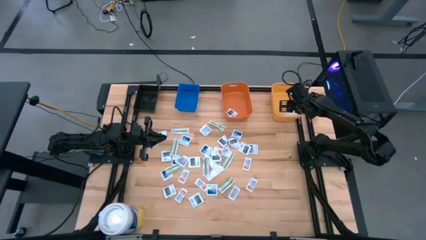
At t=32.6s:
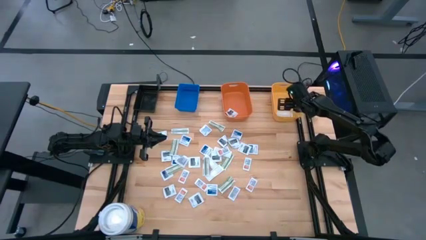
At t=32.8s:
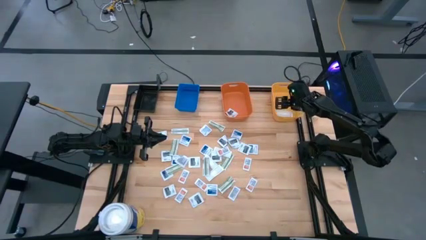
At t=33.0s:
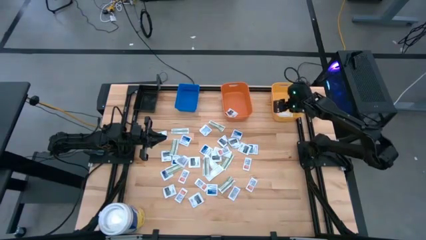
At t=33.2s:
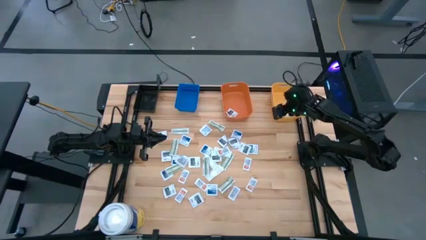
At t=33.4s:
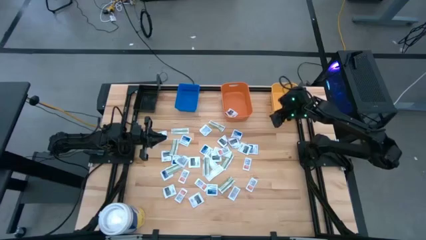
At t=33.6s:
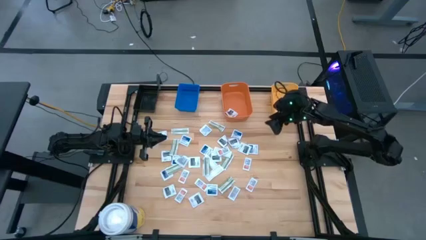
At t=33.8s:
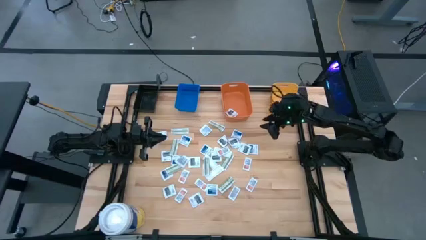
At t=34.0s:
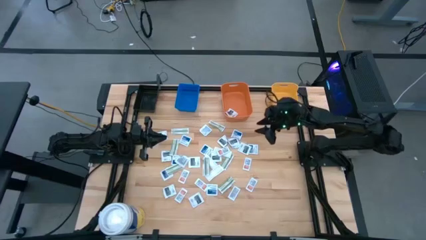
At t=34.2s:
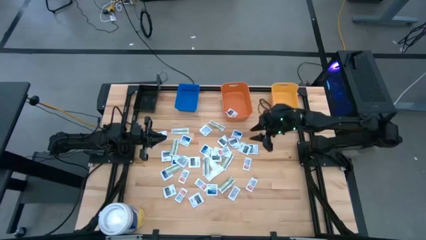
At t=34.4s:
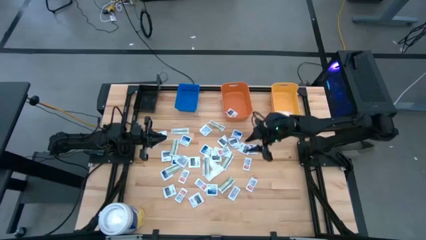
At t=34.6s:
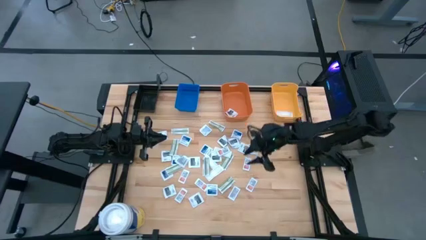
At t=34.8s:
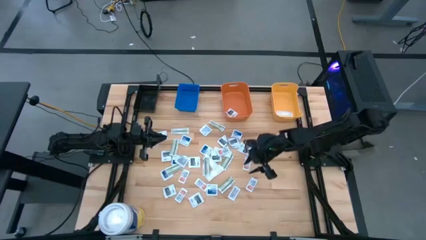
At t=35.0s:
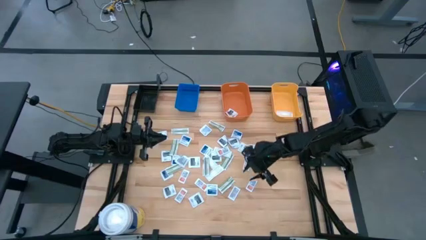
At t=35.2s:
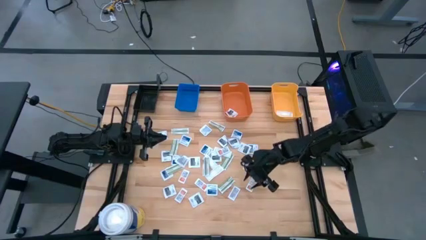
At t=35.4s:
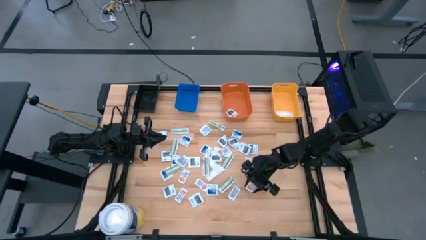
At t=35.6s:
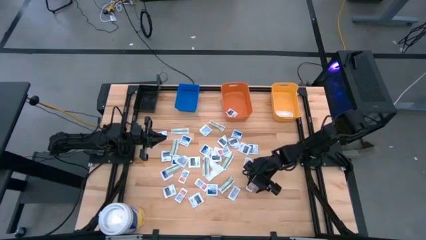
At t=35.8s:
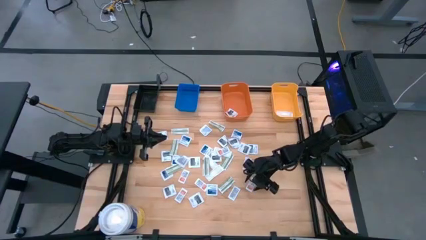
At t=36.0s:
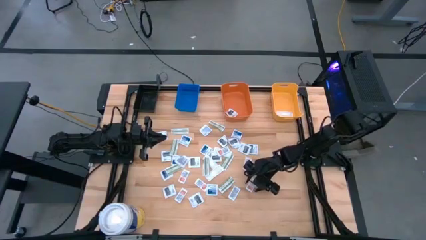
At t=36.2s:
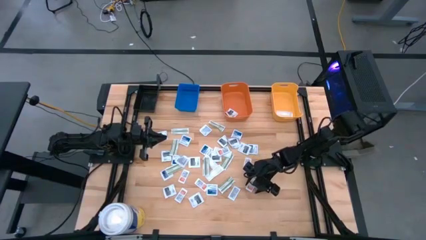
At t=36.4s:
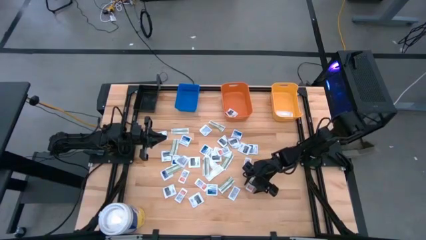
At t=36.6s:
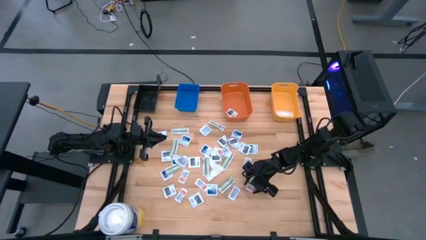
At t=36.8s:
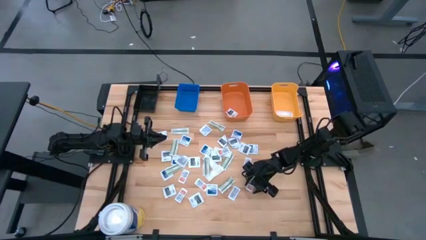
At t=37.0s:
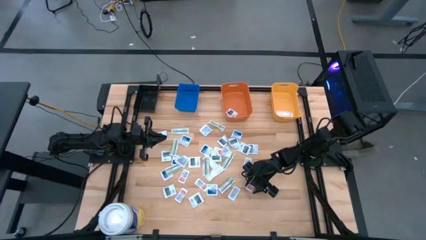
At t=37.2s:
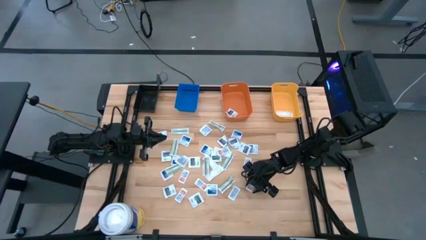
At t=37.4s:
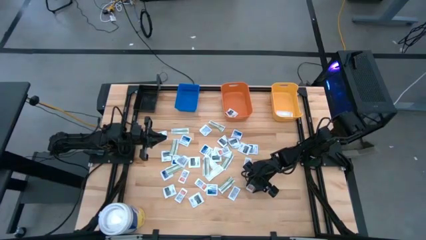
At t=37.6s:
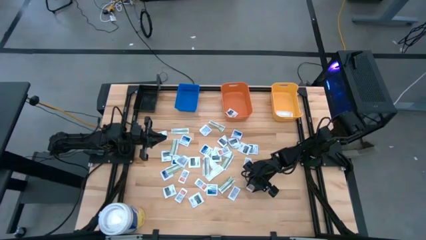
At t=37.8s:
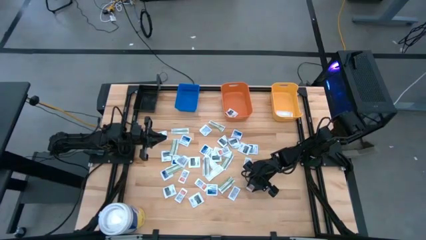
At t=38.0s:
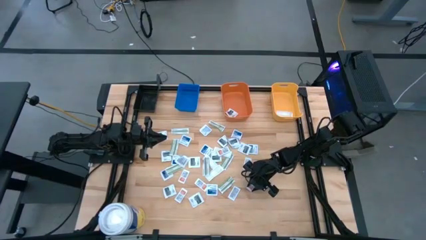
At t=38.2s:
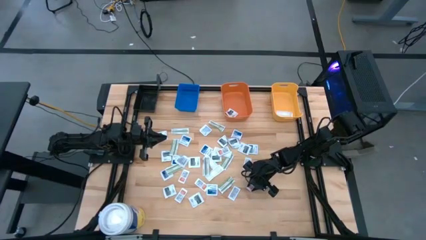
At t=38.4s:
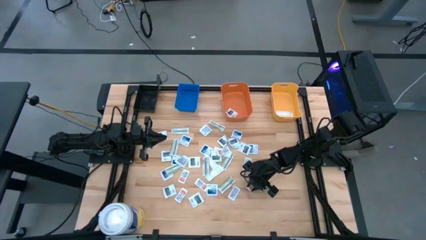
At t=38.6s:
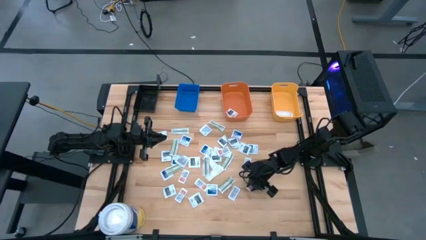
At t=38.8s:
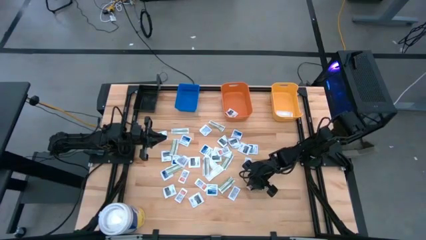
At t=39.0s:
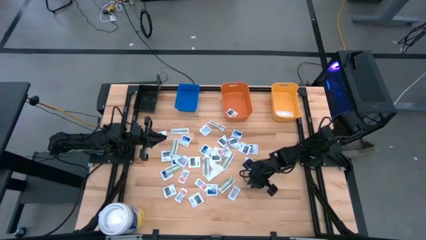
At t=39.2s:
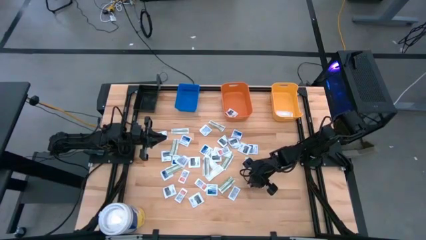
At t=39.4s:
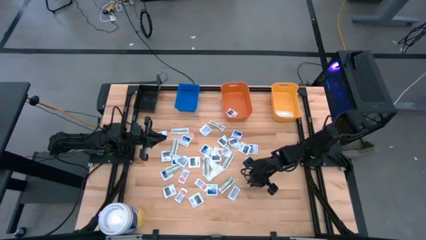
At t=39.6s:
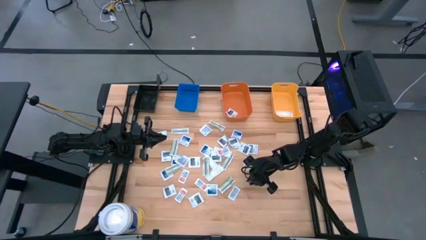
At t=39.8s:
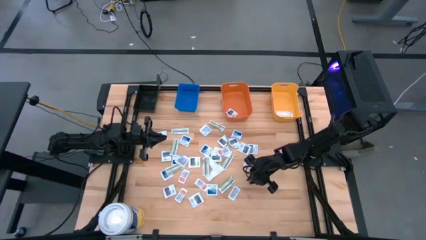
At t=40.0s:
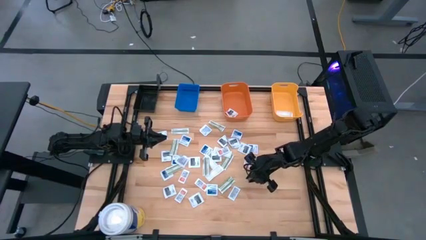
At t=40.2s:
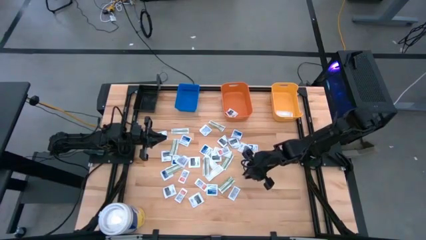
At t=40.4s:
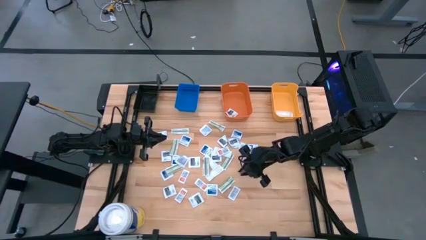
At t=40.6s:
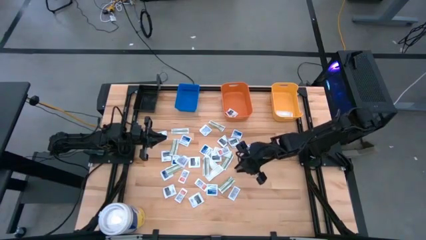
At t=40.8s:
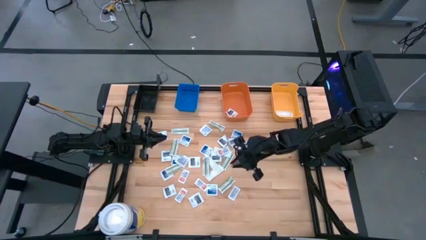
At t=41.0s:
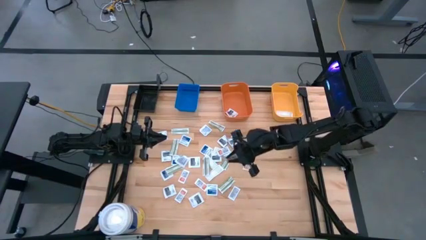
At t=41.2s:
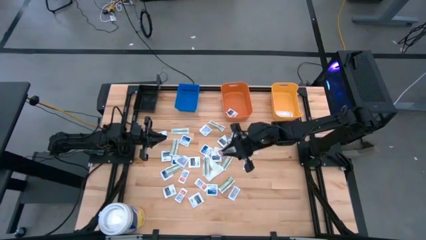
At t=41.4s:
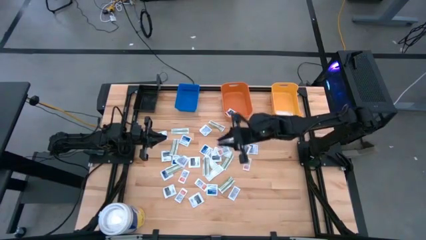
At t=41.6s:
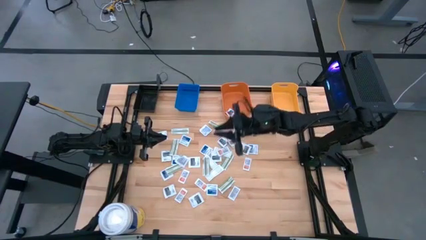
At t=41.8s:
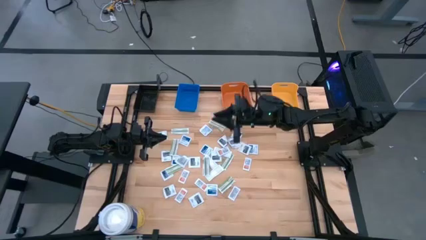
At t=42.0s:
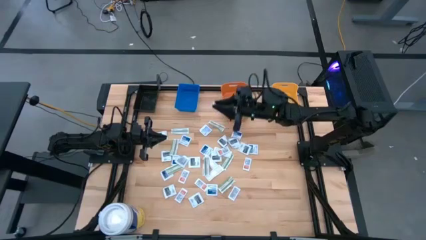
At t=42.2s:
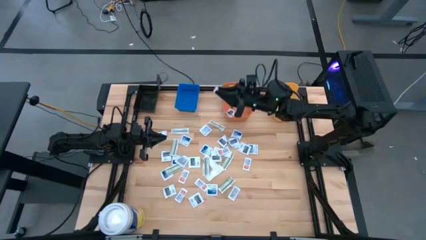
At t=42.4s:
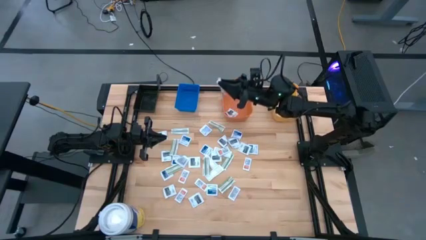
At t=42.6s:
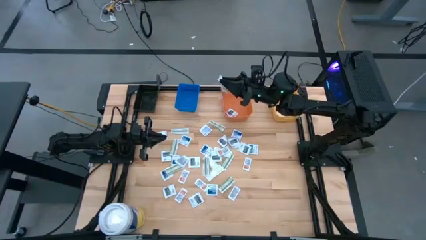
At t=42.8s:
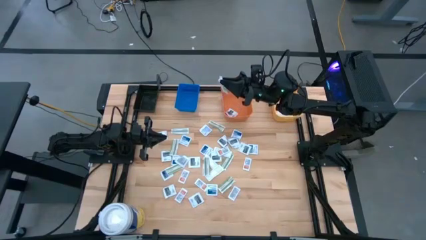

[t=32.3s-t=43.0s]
Task: Pick & Place First Aid Supplies
Put the ointment pack into the blue bin

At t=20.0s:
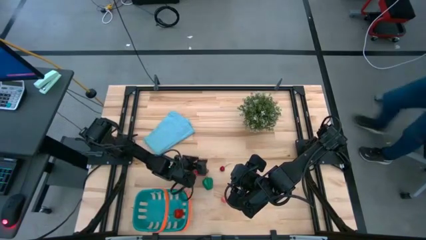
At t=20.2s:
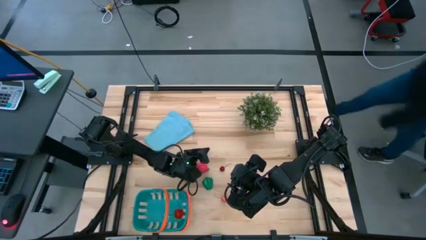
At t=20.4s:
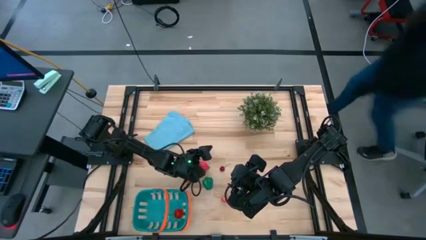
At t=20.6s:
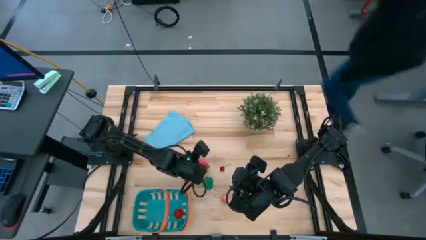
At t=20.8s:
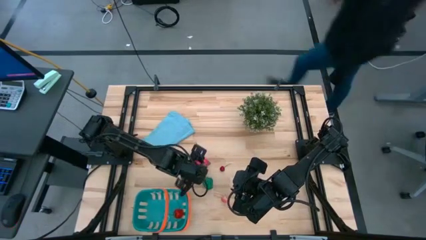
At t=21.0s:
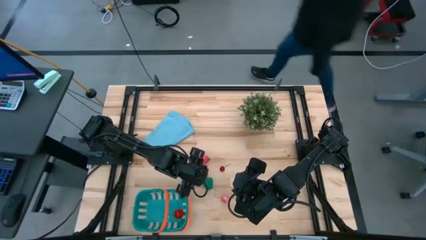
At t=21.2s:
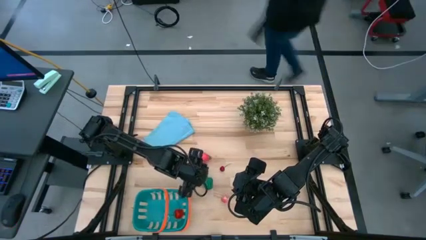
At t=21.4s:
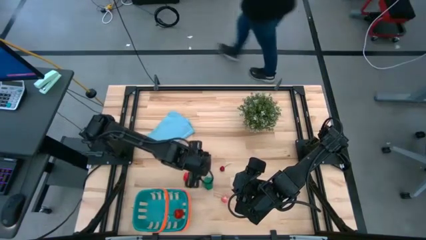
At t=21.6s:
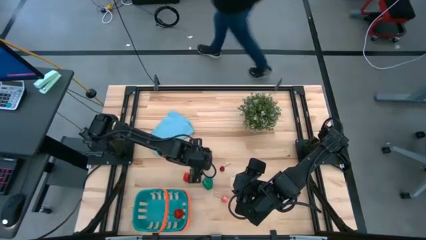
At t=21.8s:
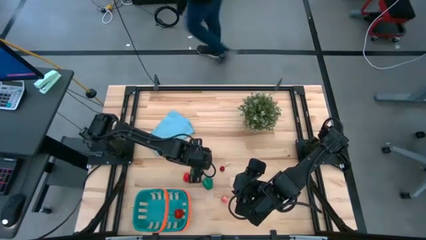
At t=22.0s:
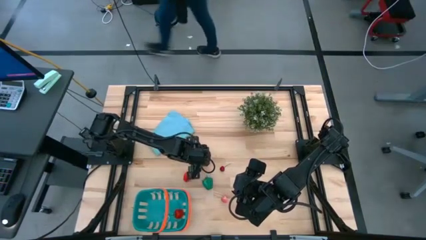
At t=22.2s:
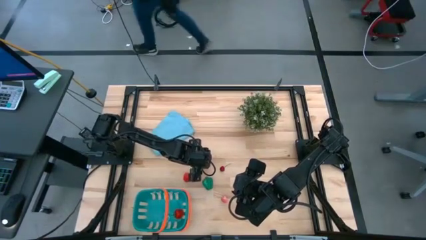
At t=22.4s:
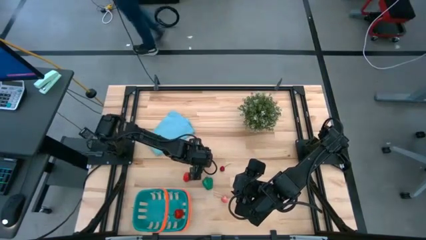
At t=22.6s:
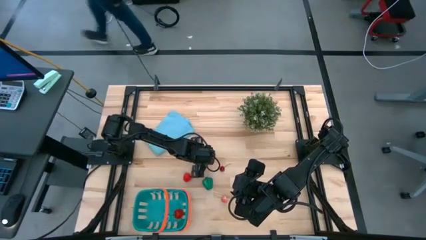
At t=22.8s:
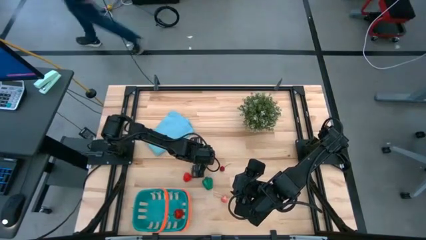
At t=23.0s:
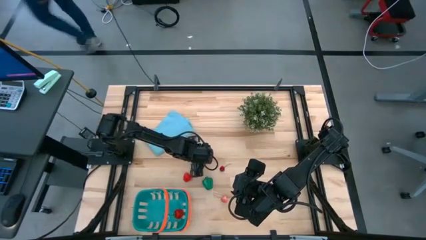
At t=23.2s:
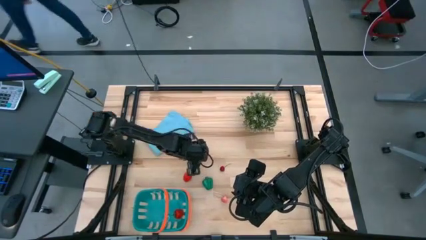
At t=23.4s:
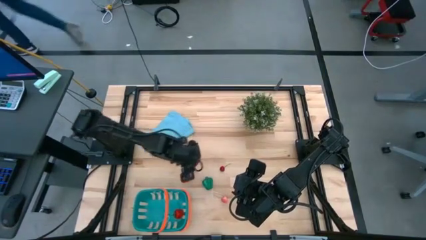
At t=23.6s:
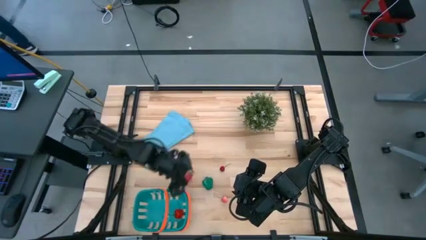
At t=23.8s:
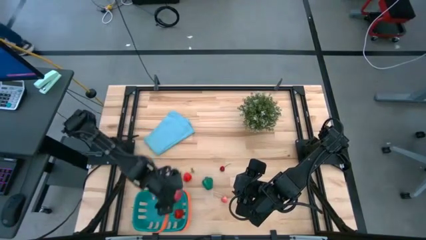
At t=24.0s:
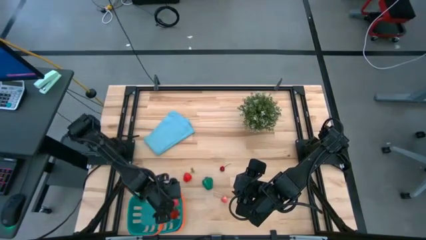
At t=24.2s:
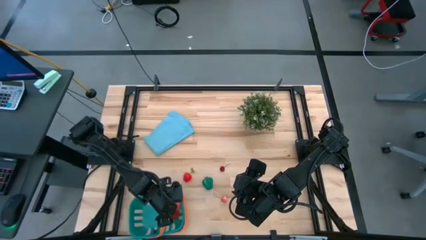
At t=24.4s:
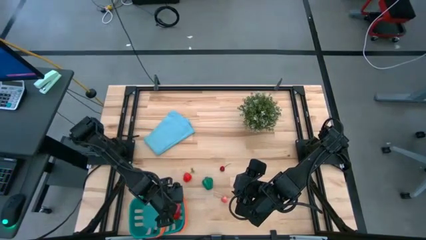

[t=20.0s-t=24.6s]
Task: Pick and placing Produce into tupperware
Put the red dragonfruit into the blue basket
